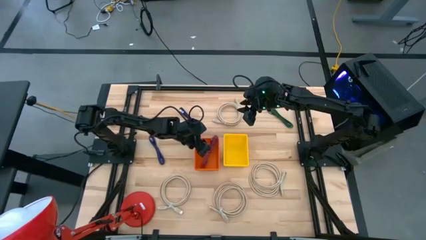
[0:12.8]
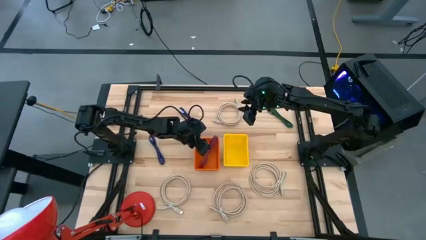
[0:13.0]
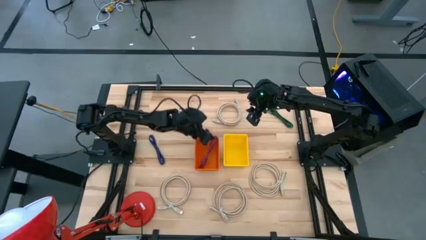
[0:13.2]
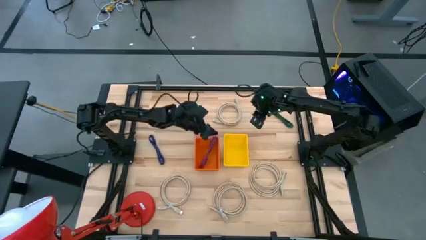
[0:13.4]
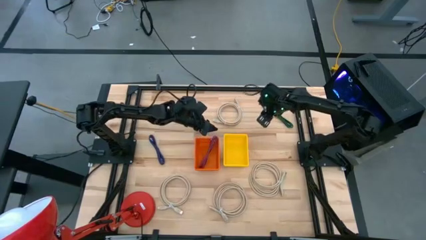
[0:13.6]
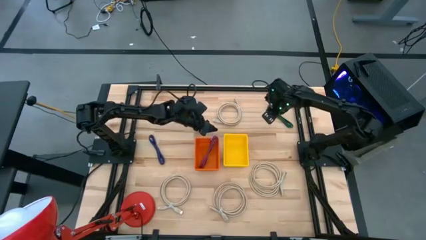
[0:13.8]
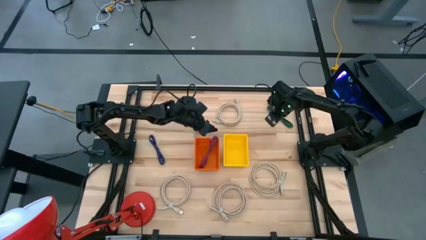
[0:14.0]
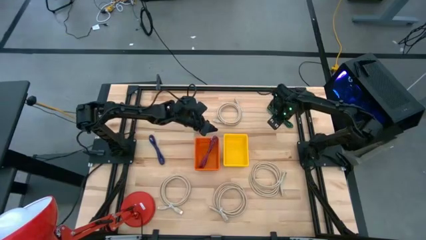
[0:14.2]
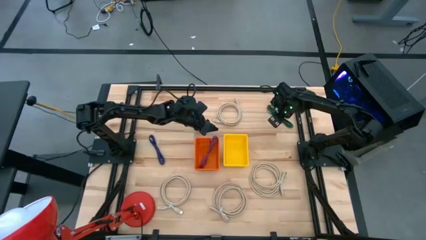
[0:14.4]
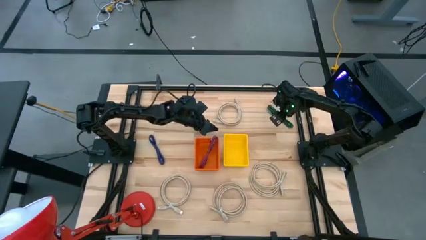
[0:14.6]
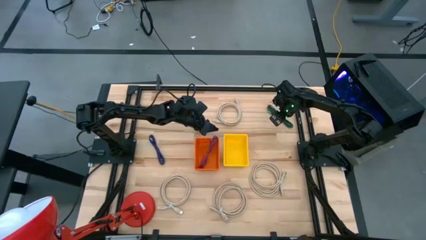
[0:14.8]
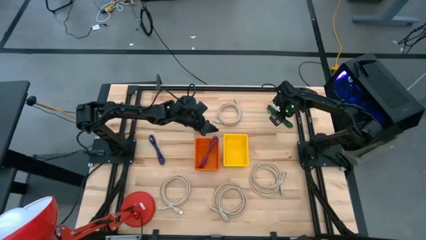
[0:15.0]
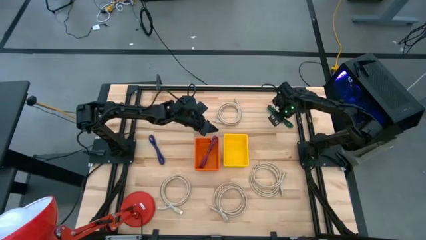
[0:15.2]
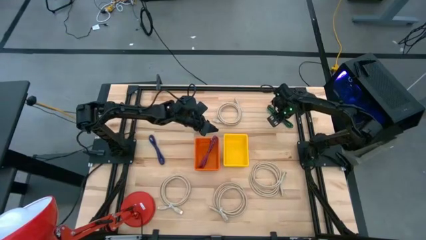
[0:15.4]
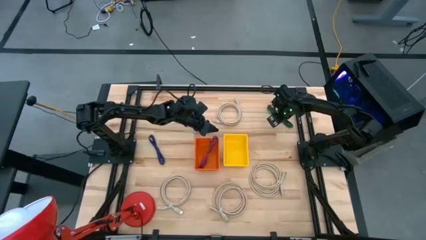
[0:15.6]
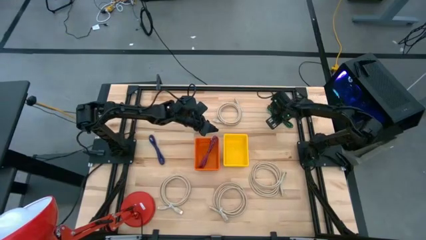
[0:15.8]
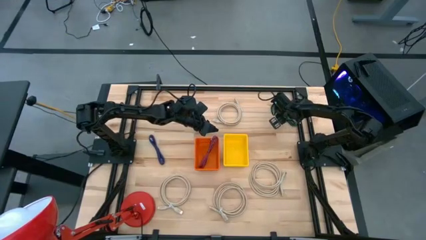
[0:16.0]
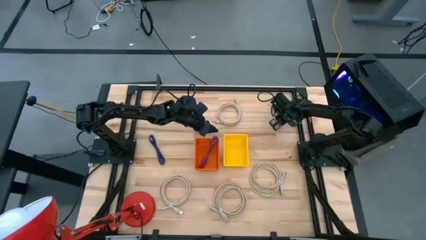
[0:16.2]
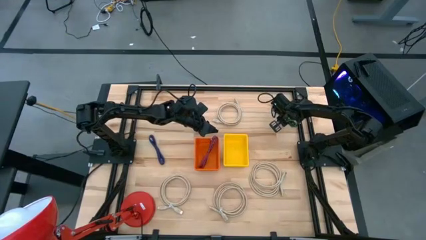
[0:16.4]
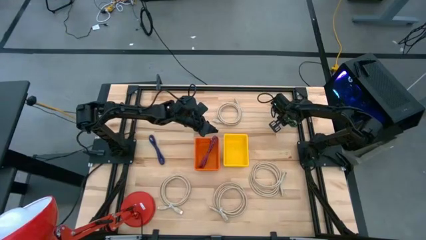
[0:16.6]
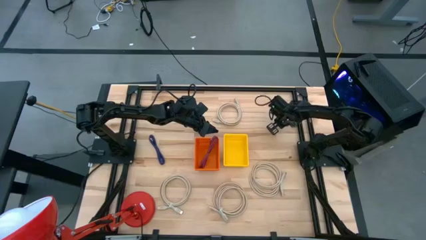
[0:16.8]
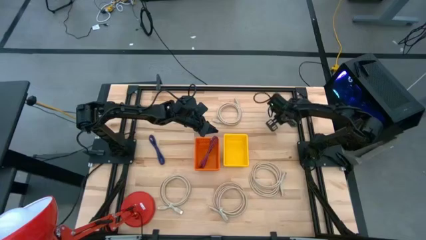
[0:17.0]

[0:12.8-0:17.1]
Task: Pick & Place USB Port
Put the green charger cable into the orange basket

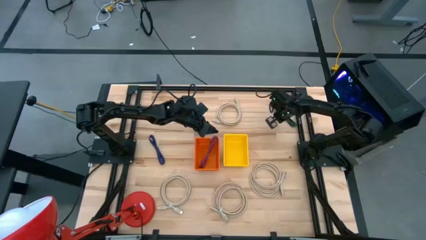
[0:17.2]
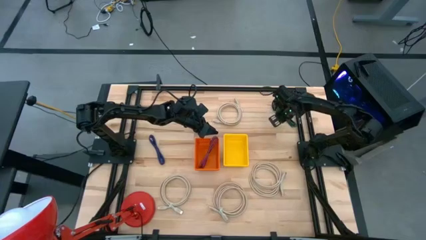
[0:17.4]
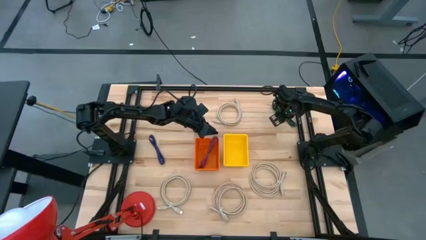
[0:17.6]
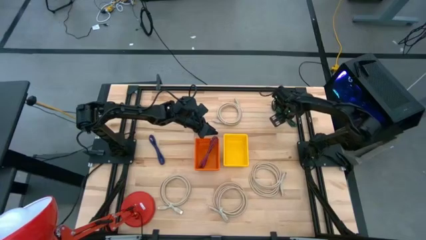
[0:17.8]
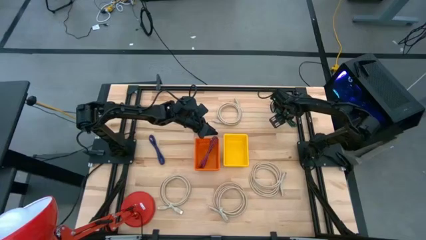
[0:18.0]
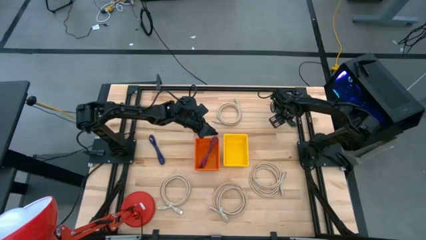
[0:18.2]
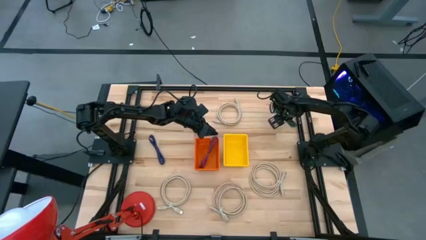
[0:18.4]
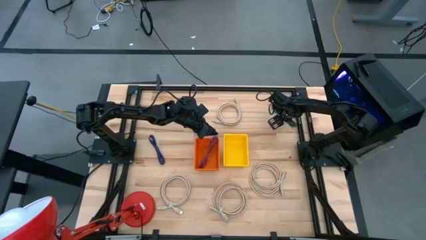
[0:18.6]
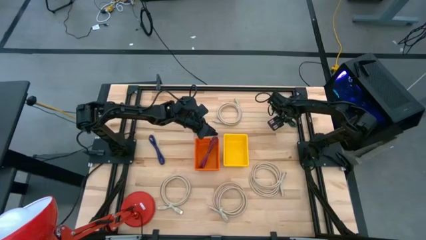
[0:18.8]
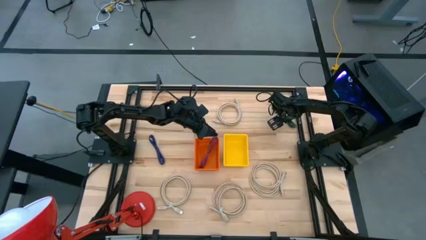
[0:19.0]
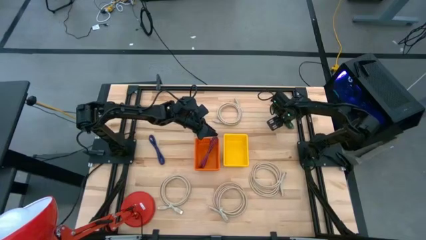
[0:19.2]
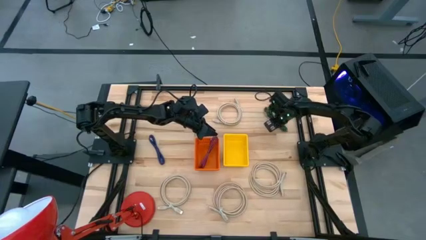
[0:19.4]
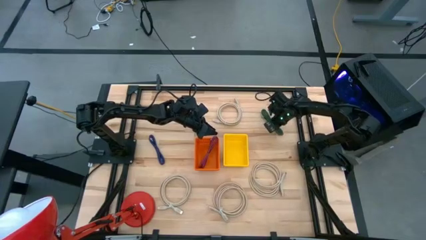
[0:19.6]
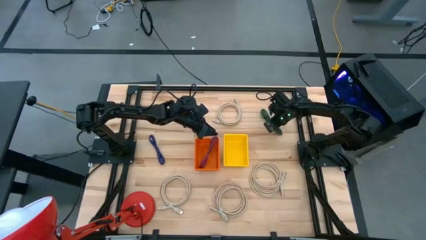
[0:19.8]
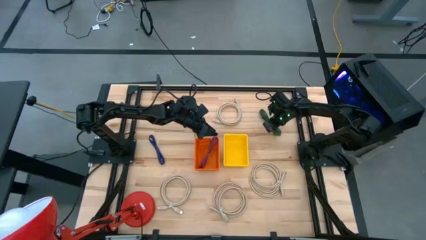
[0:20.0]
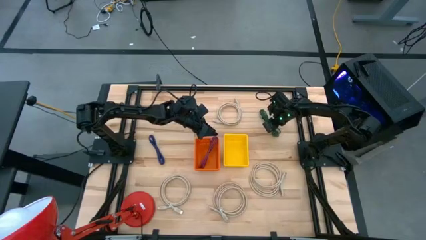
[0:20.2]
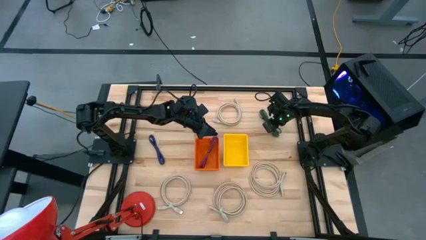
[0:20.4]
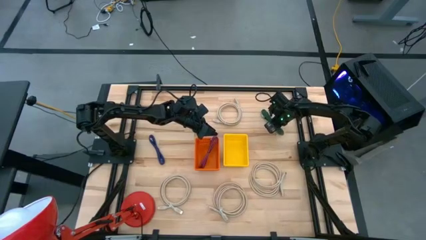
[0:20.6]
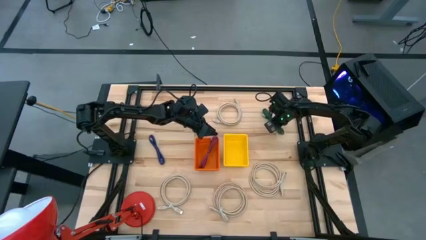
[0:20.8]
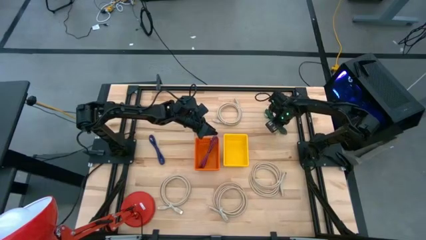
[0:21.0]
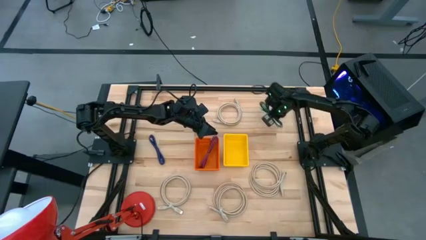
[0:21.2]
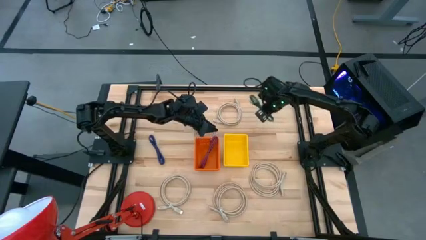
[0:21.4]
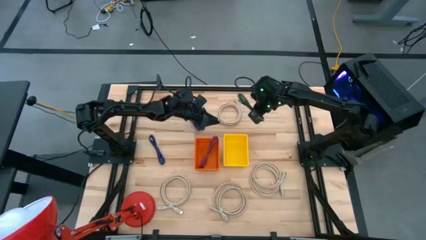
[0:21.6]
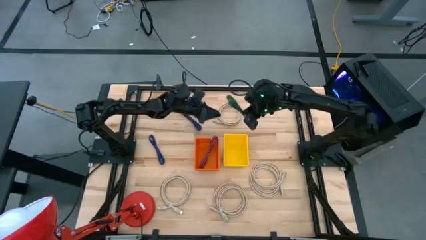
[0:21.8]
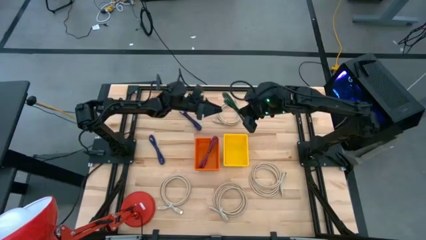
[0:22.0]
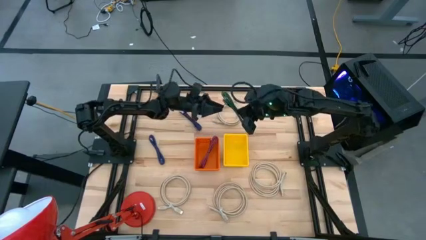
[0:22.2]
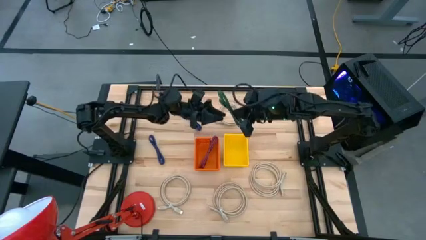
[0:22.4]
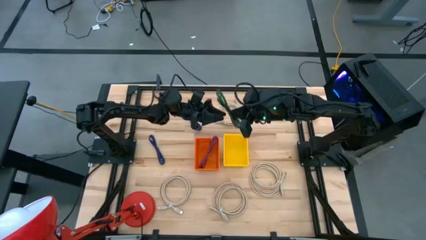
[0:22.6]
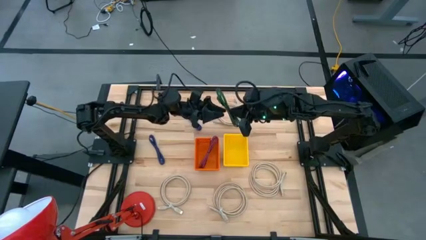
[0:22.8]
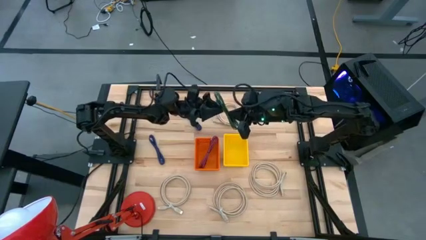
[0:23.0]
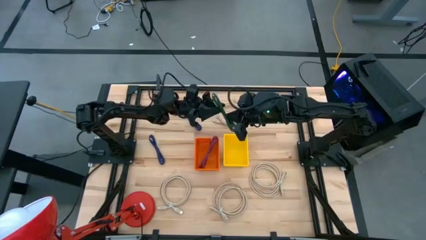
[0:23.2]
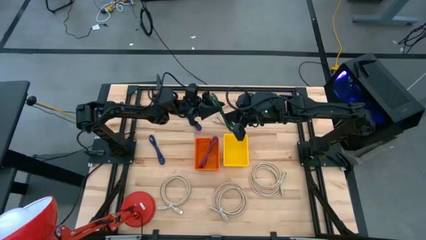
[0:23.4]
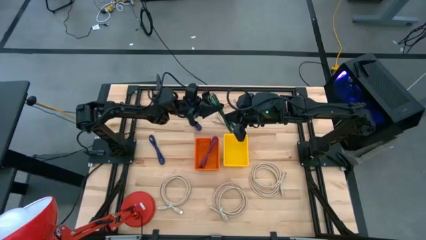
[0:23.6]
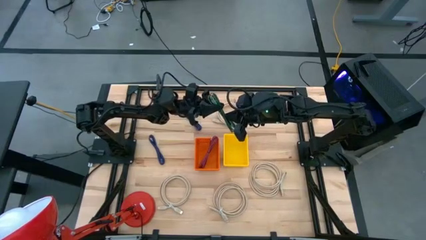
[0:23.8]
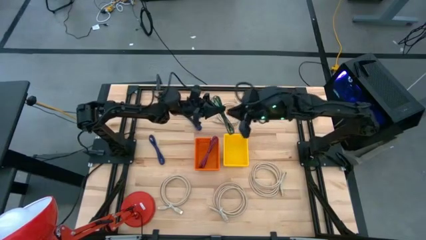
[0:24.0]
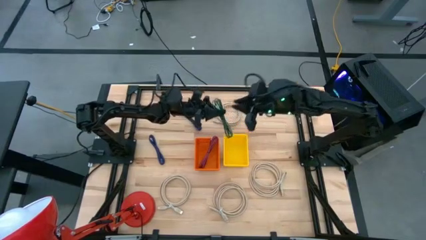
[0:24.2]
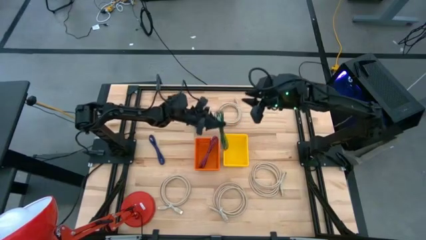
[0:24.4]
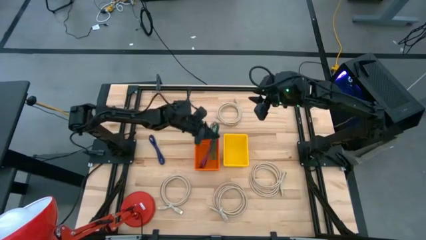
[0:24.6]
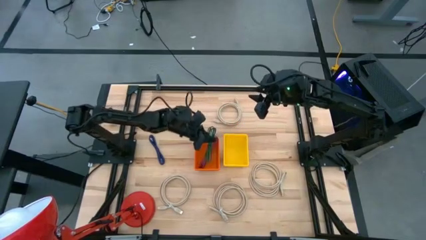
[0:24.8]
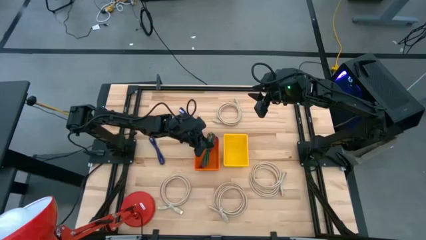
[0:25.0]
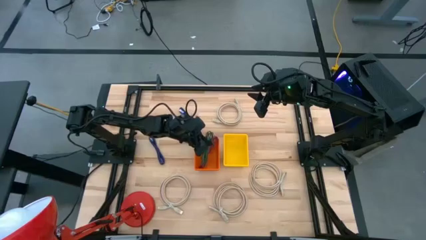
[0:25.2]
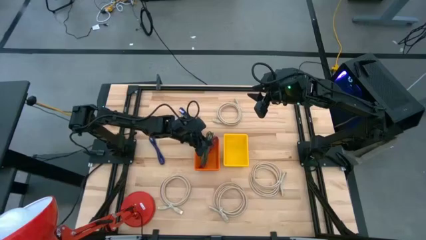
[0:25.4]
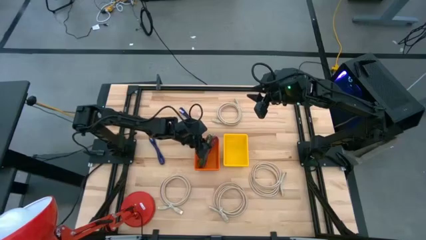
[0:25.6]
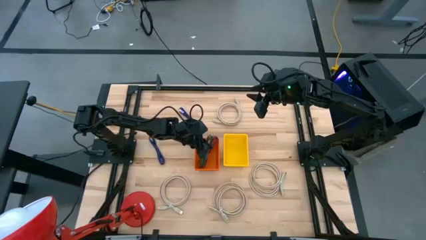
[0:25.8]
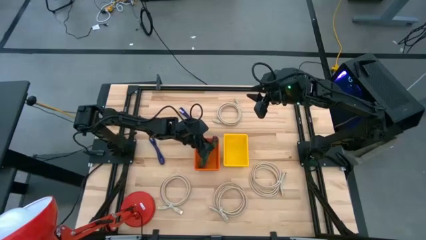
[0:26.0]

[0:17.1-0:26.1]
Put the green charger cable into the orange basket

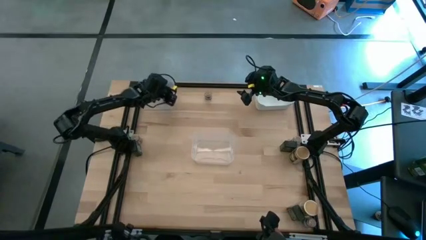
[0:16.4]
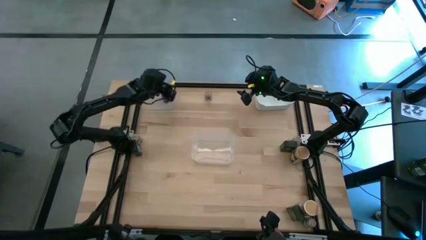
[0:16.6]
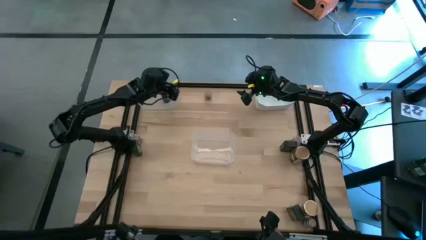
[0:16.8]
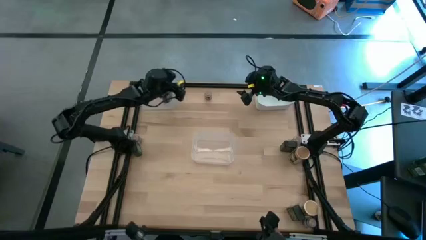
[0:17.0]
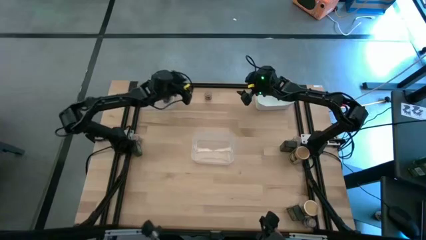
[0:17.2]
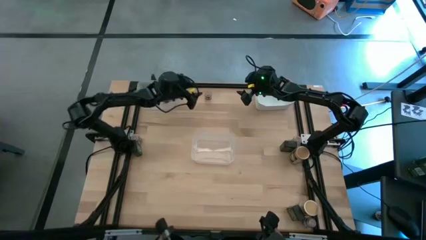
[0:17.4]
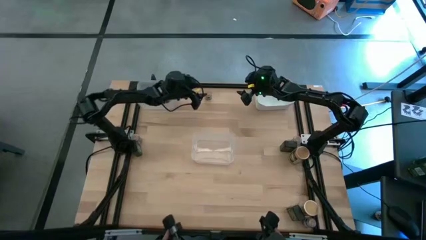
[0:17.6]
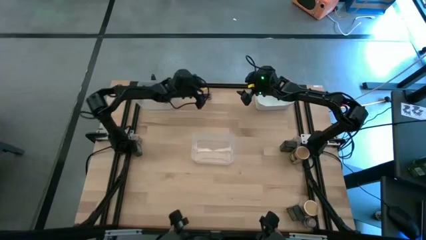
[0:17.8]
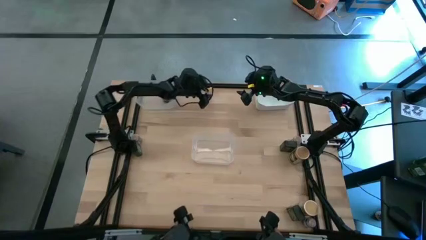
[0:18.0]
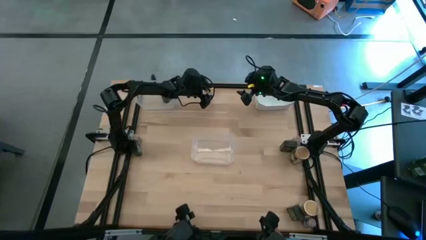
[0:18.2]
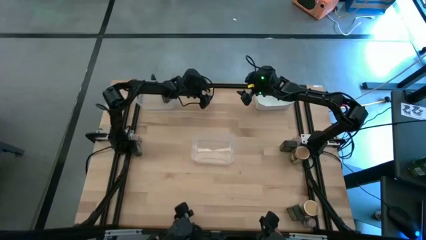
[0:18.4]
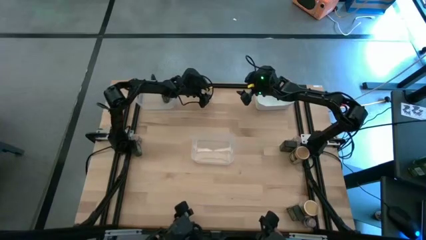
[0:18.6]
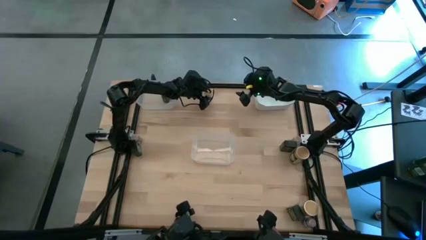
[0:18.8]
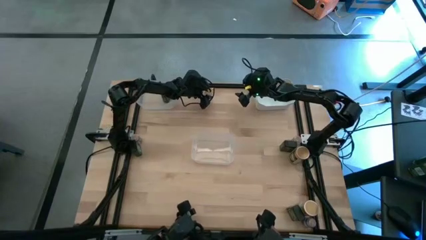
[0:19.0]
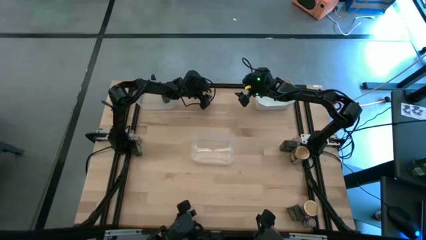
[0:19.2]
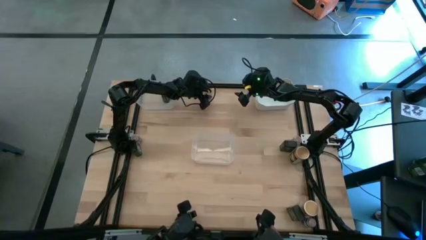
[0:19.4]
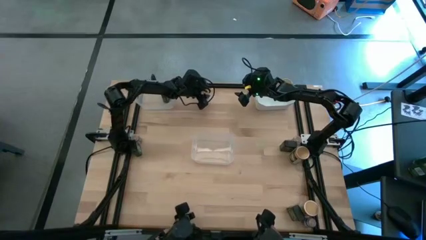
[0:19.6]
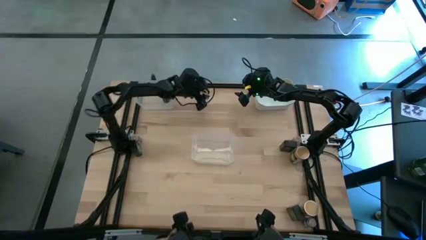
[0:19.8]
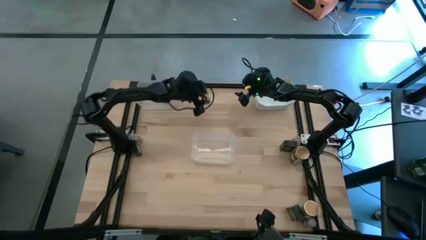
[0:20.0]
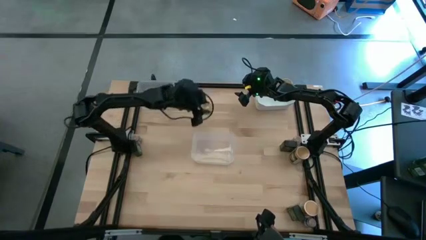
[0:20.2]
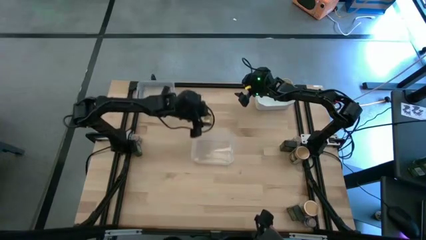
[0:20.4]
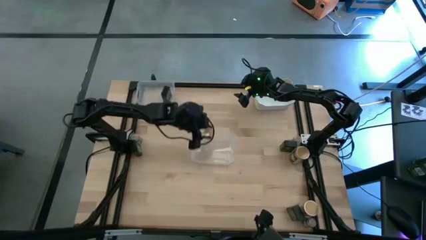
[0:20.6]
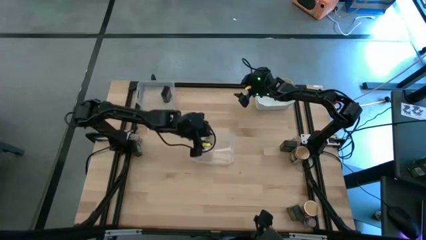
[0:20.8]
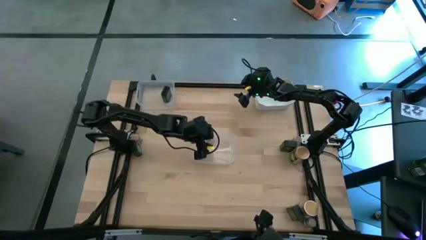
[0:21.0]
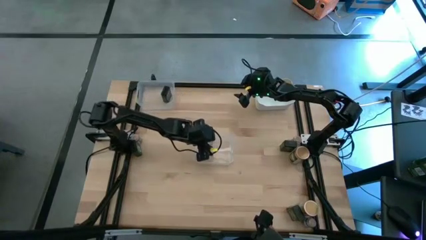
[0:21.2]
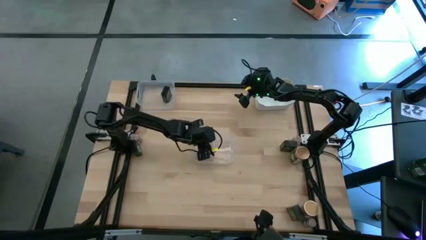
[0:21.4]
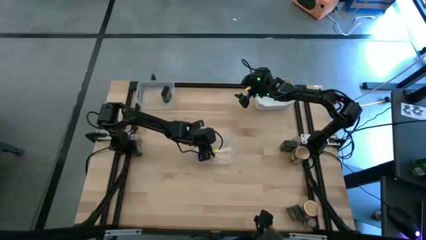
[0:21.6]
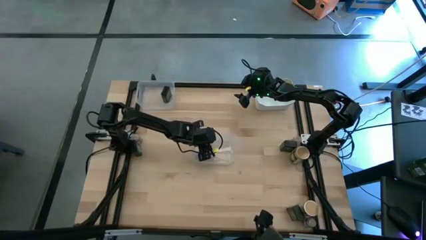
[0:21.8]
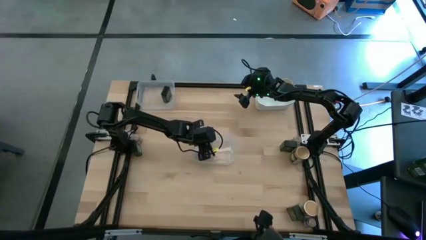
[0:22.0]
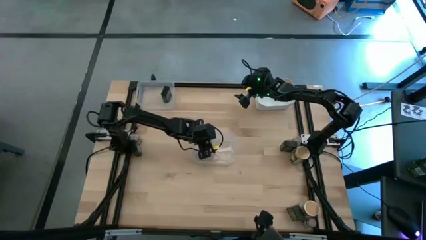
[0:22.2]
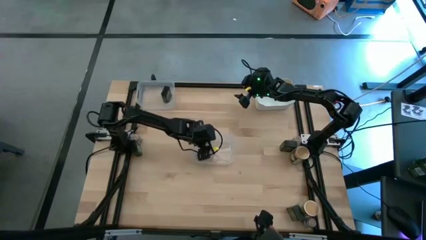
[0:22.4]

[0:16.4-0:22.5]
Task: Sort spices by type
Put the brown seasoning bottle into the bottom transparent bin
